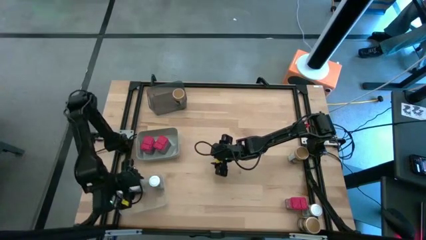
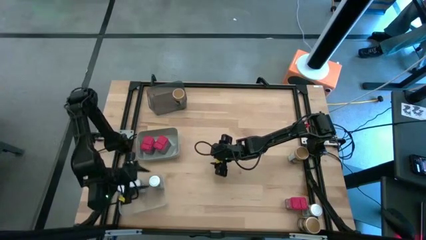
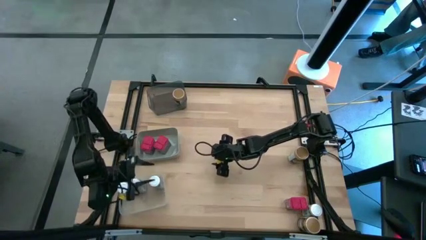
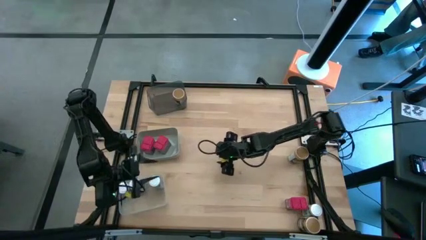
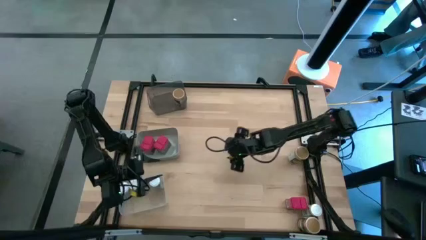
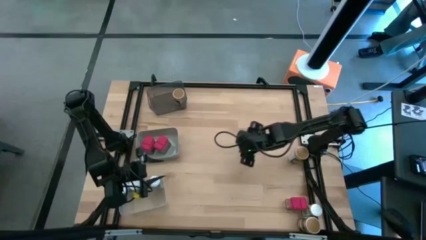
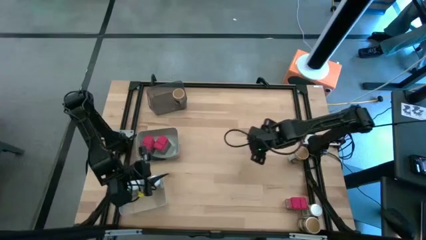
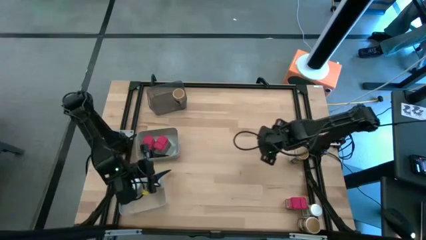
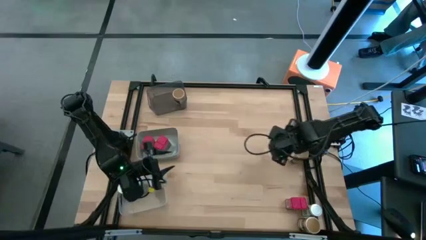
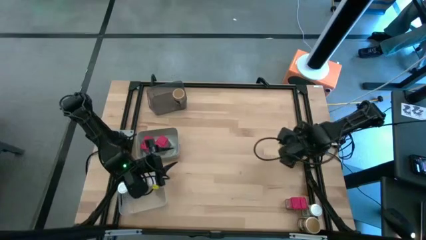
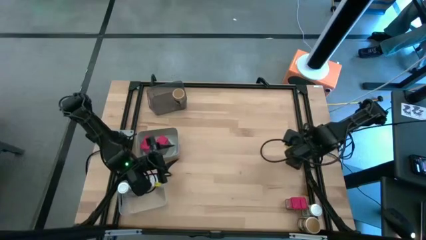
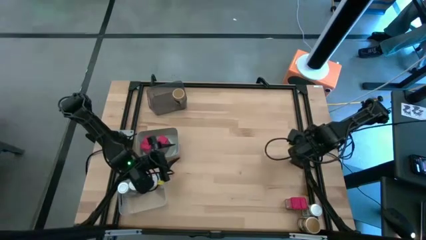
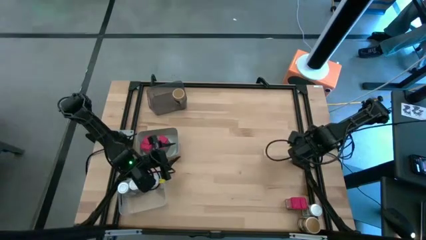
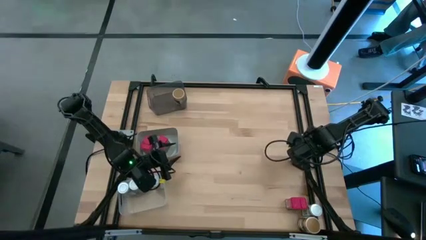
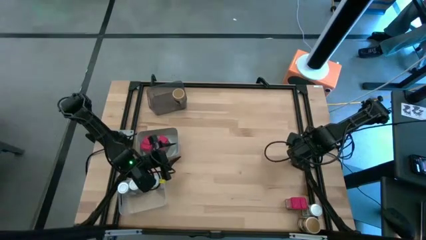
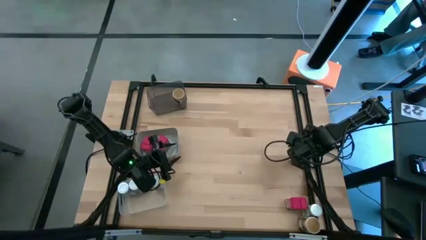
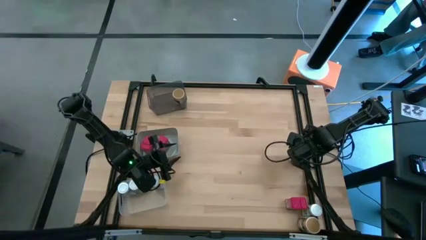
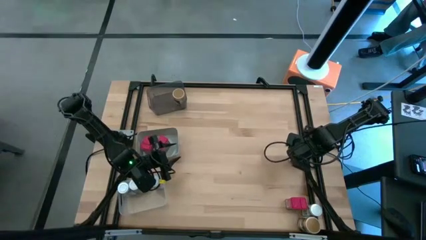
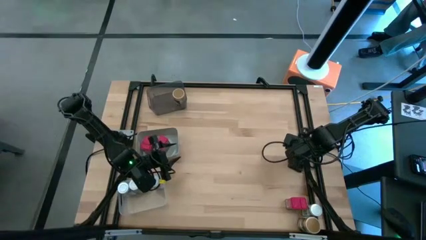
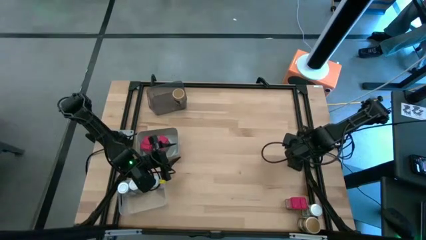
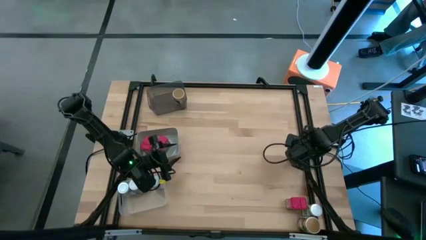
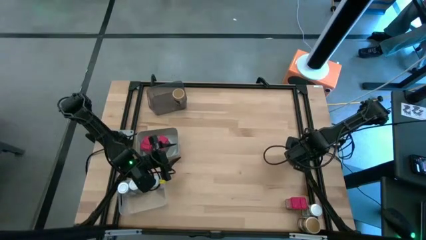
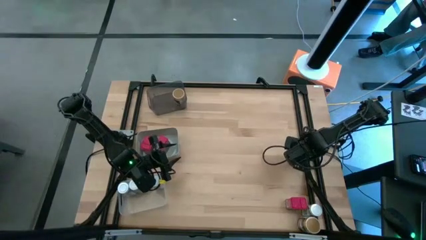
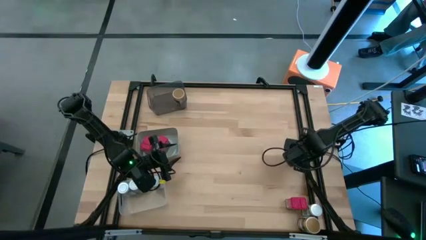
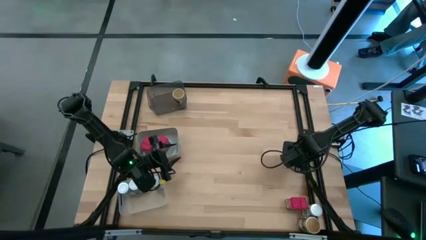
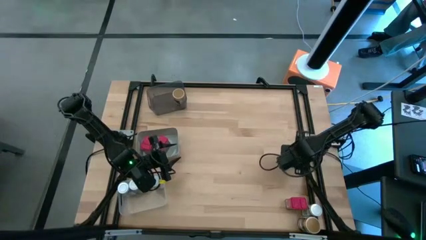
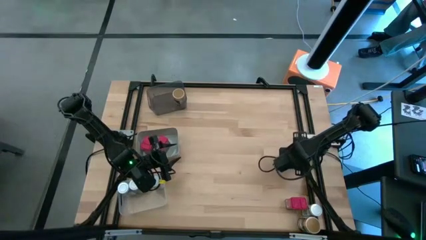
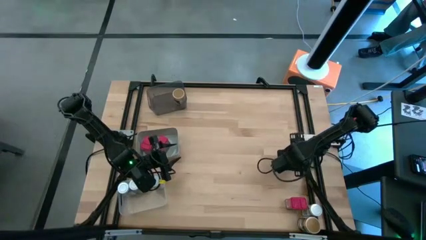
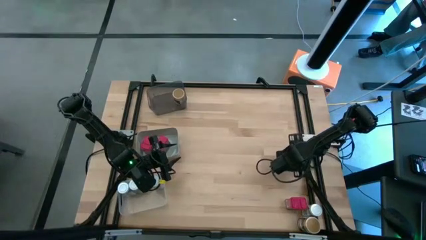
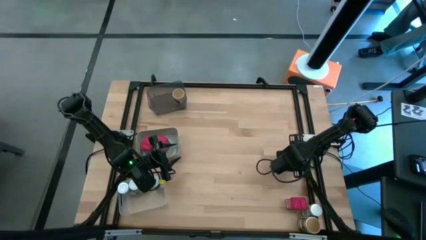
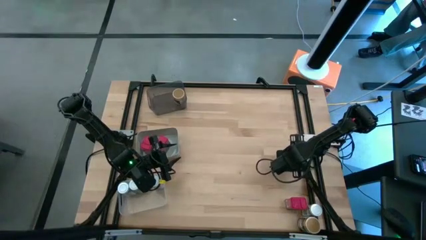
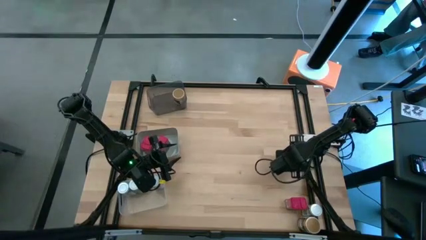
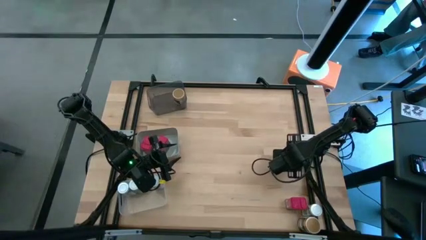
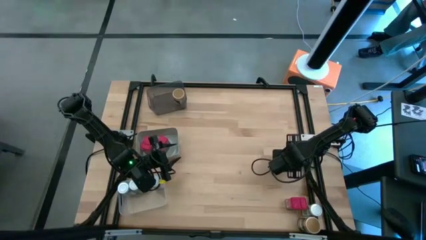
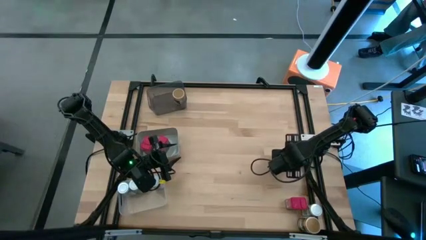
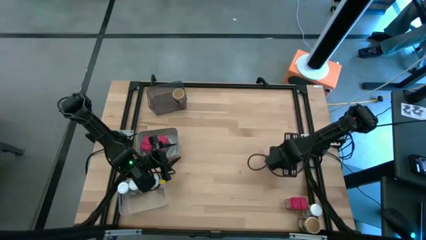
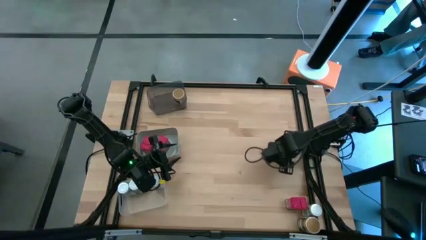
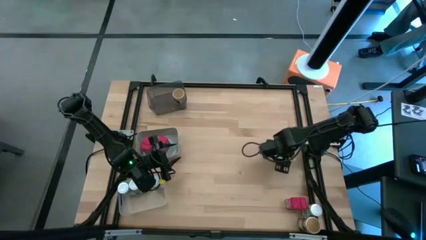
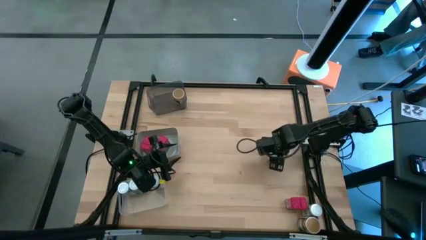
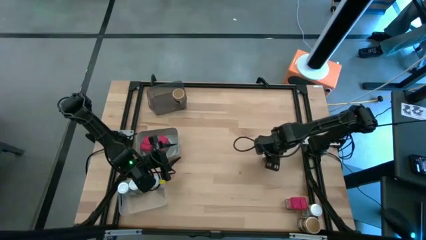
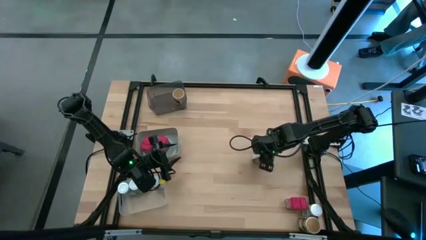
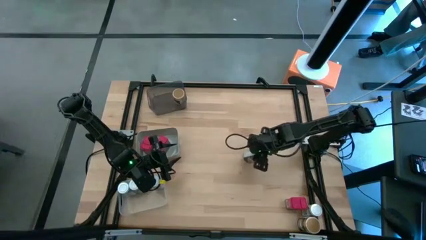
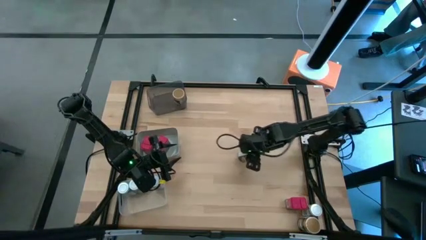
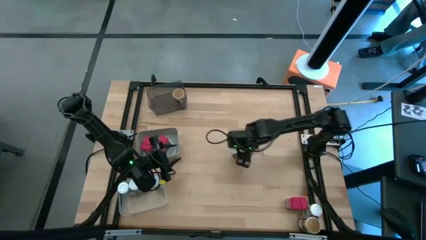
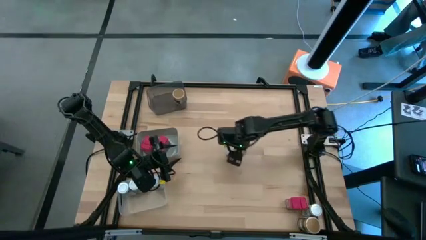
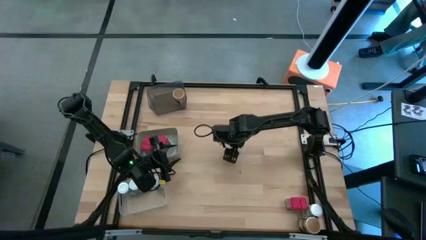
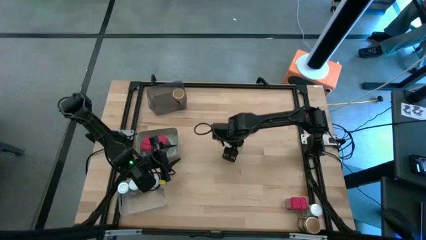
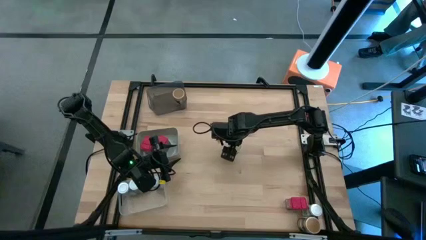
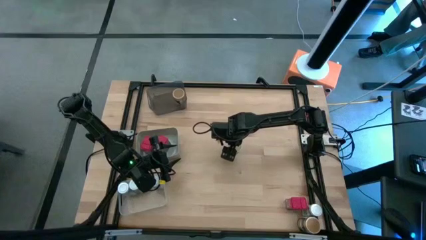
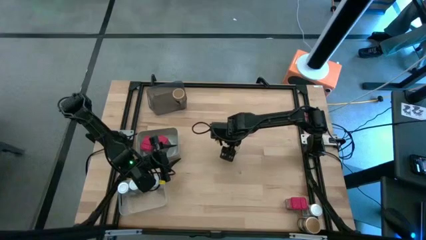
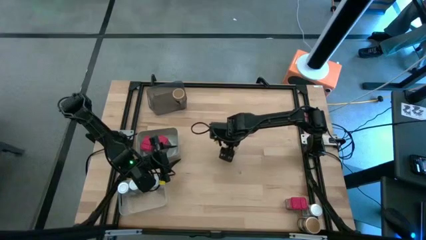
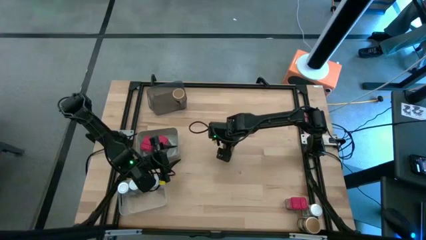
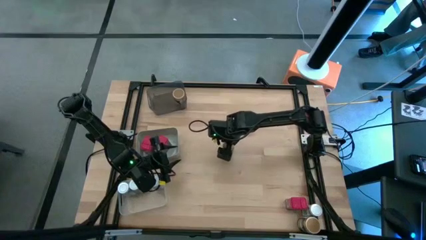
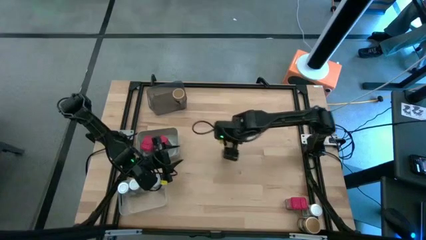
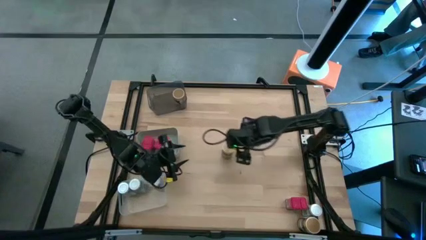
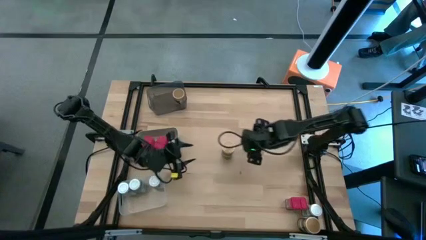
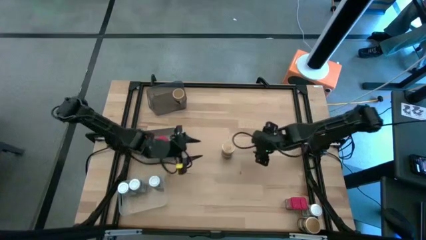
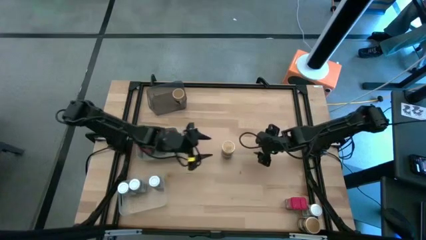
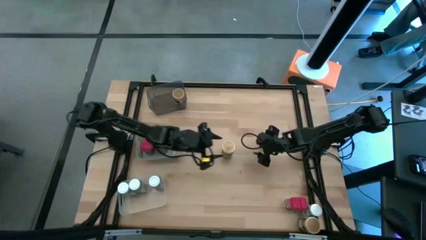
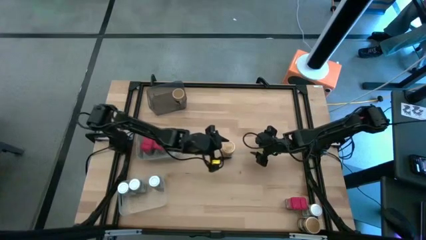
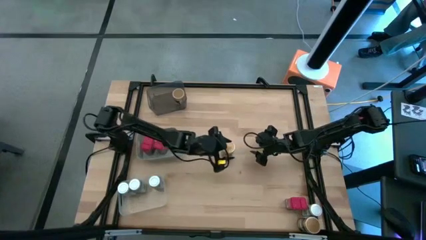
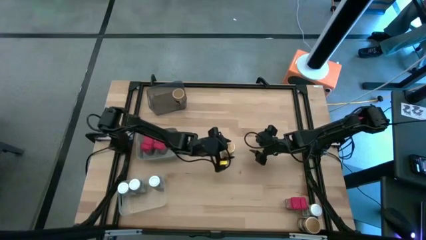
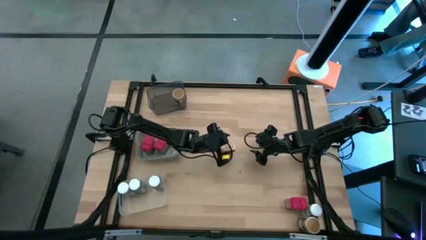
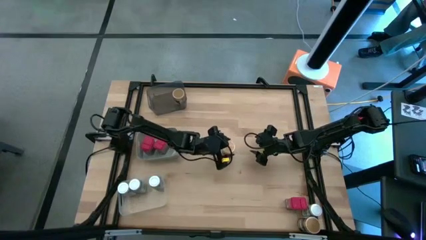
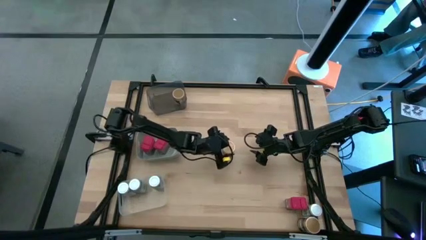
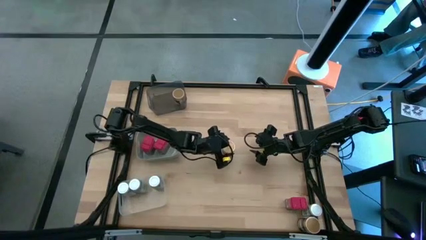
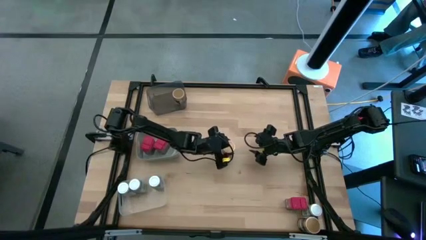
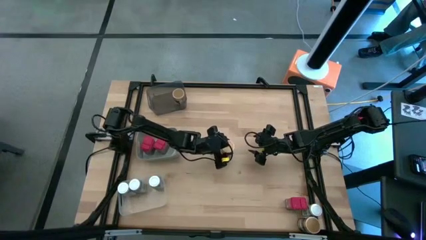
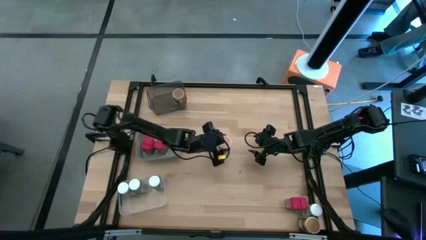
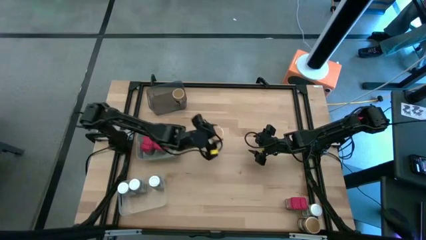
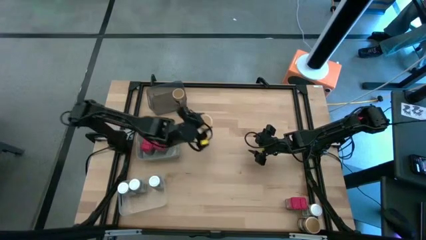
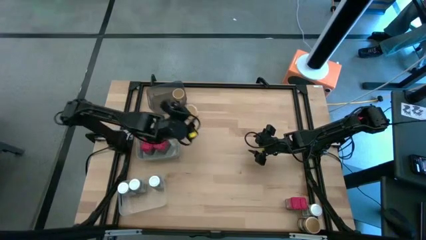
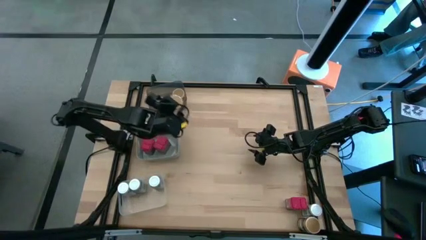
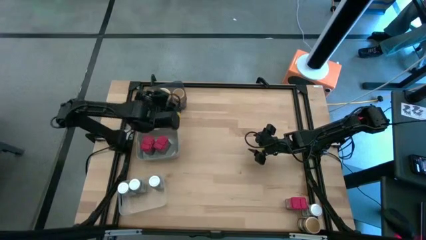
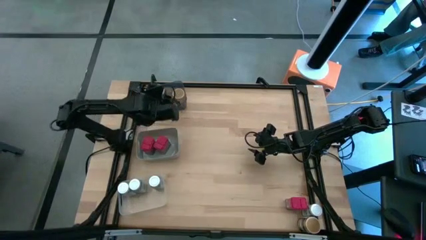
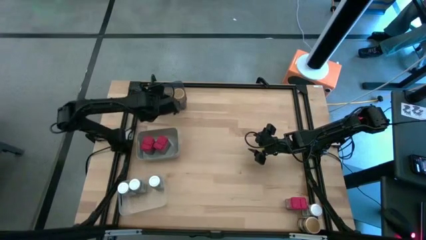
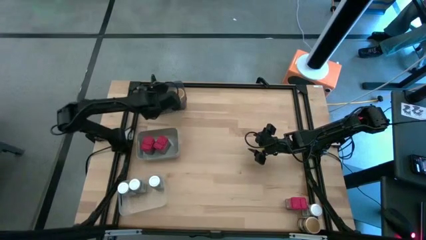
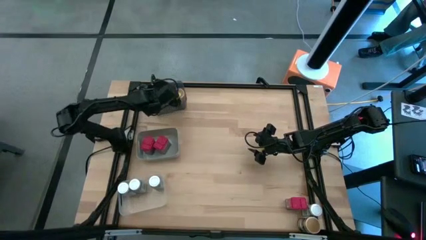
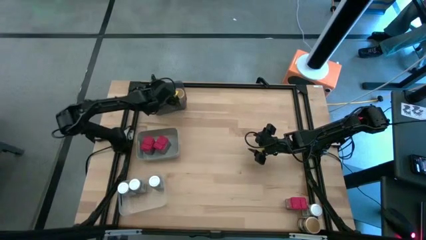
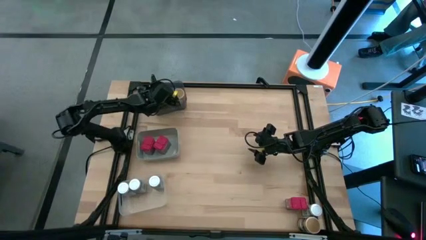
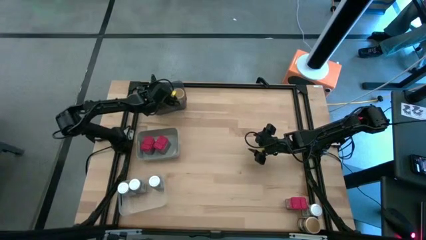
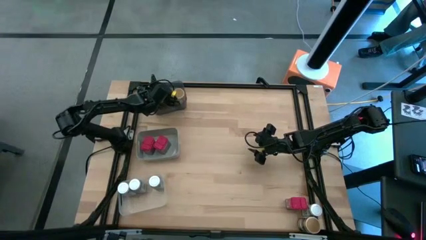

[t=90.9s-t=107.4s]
Task: Sort spices by type
Put the top gold seasoning bottle into the black transparent bin
